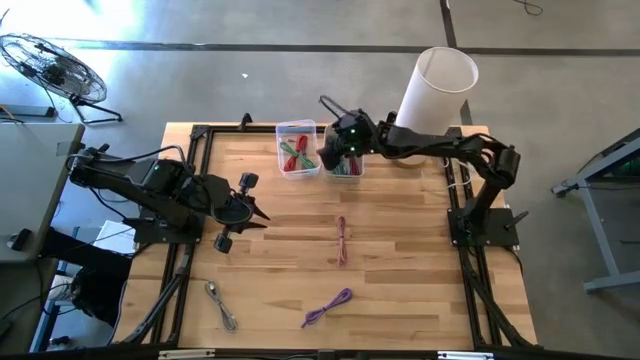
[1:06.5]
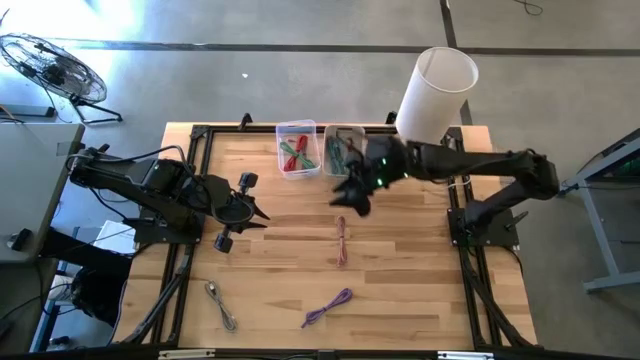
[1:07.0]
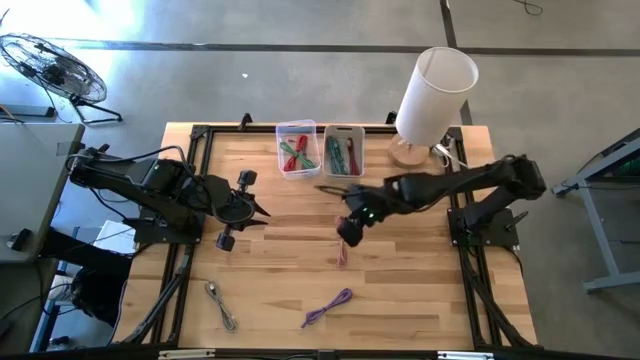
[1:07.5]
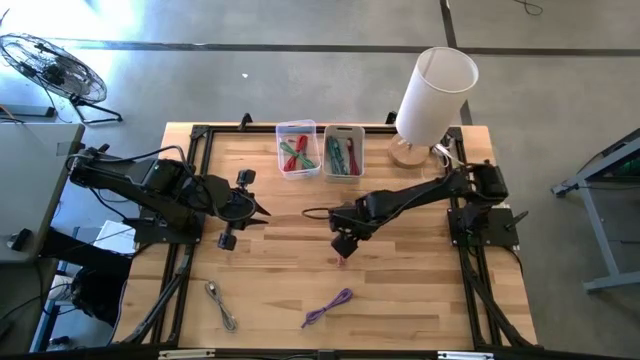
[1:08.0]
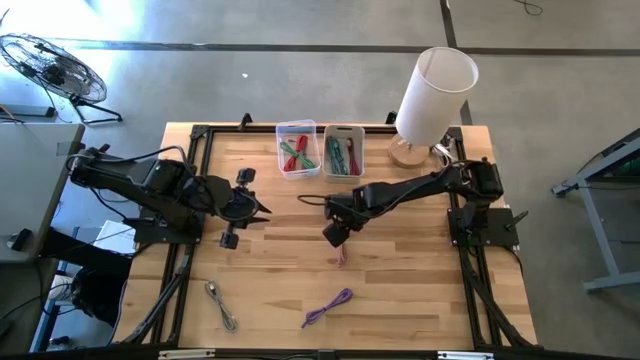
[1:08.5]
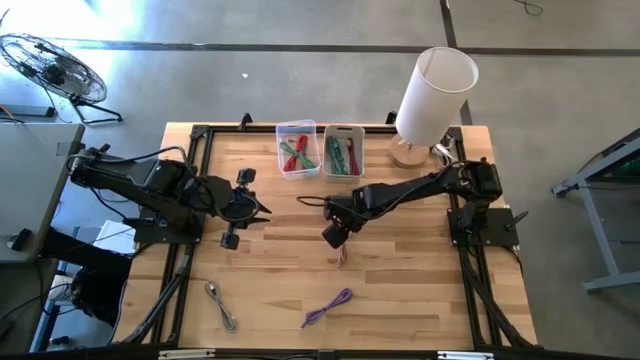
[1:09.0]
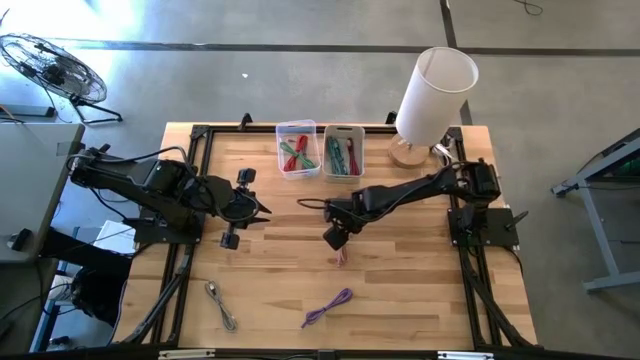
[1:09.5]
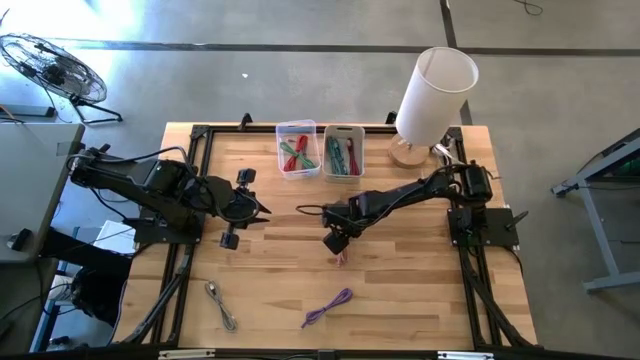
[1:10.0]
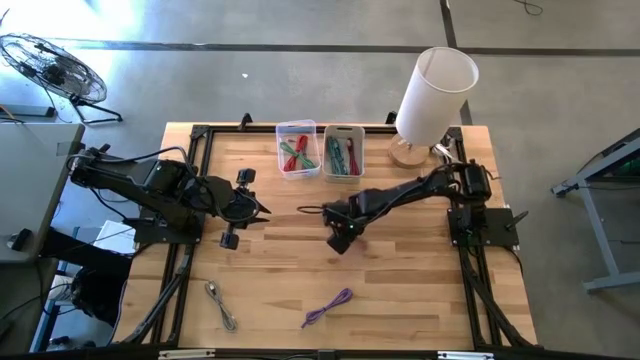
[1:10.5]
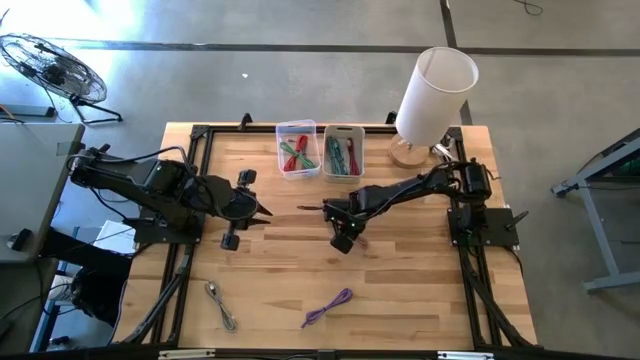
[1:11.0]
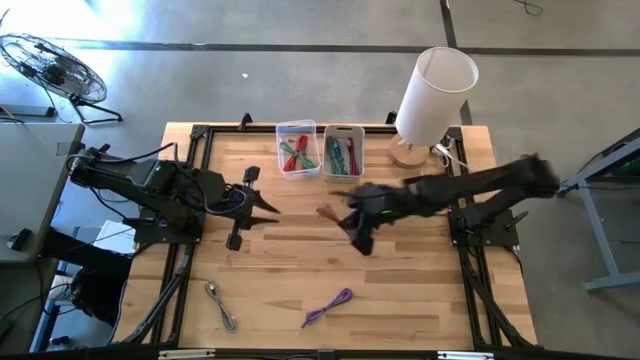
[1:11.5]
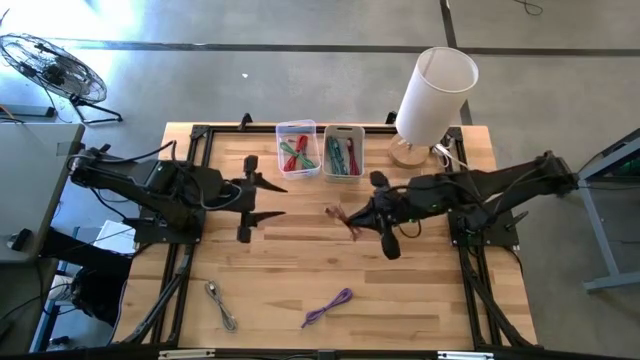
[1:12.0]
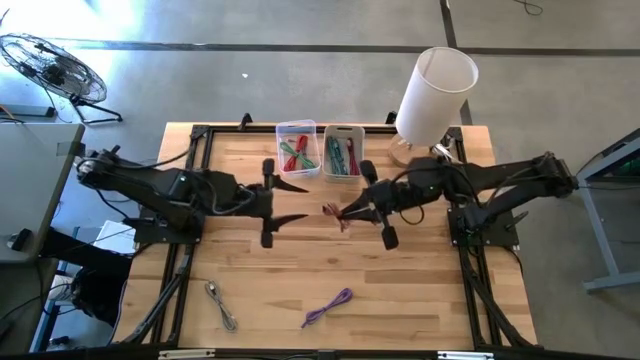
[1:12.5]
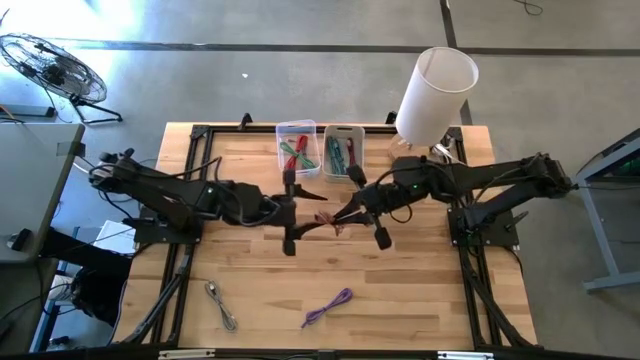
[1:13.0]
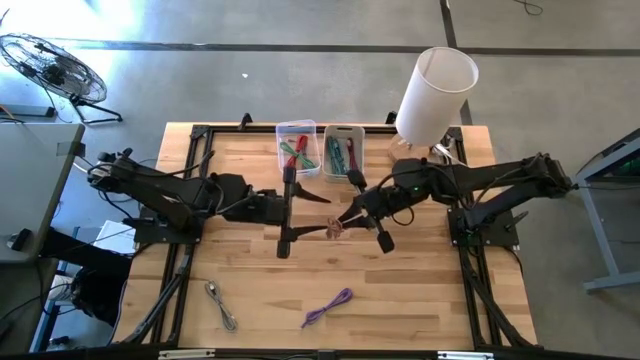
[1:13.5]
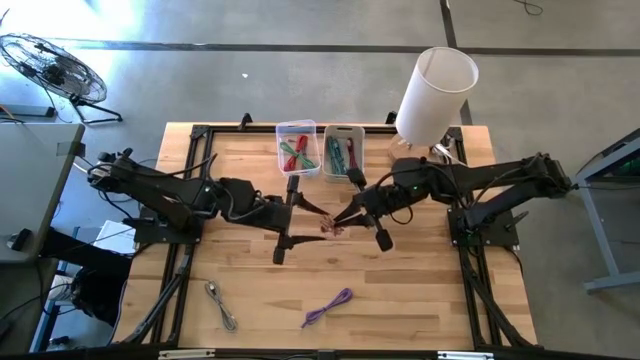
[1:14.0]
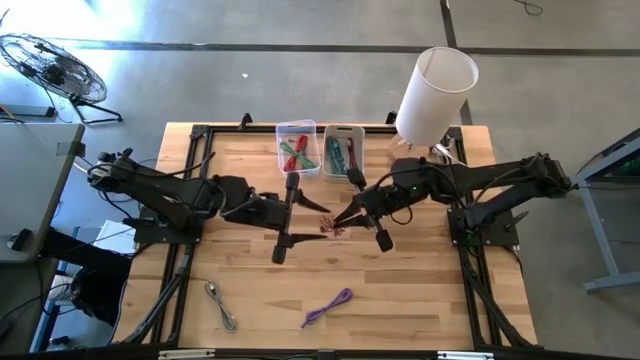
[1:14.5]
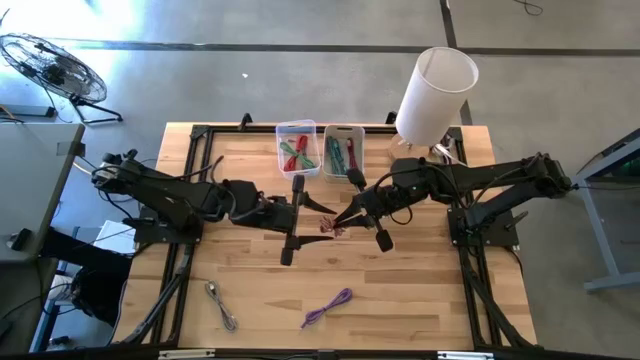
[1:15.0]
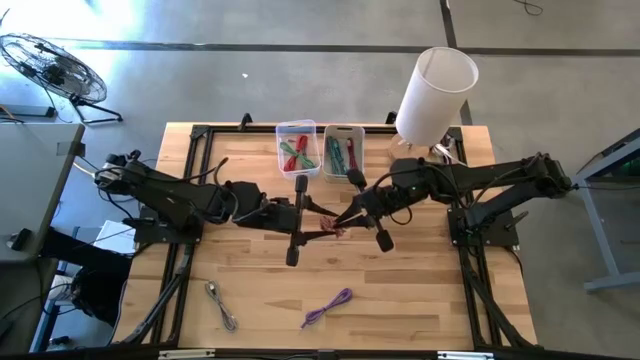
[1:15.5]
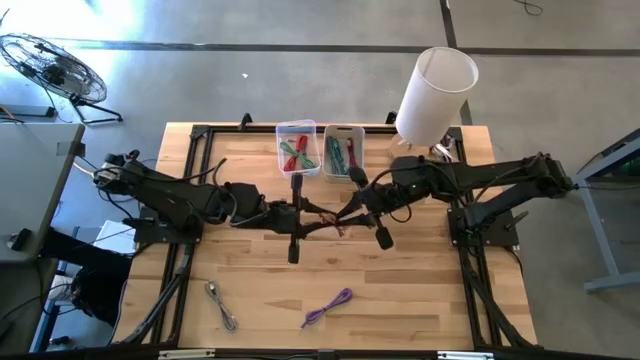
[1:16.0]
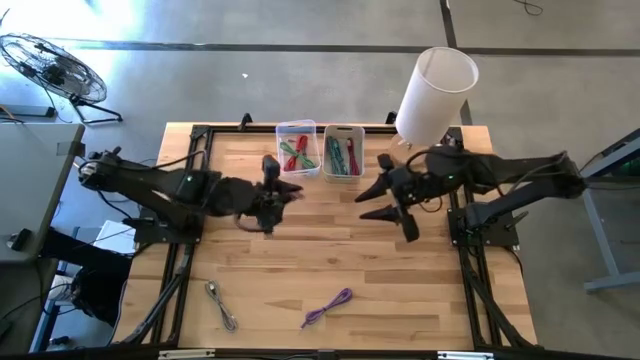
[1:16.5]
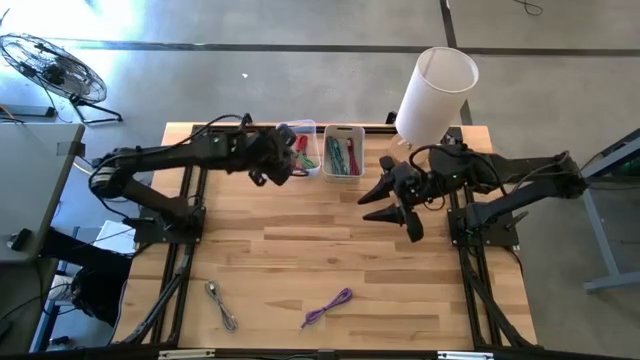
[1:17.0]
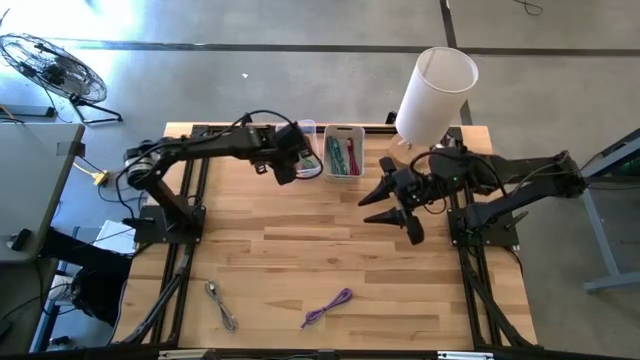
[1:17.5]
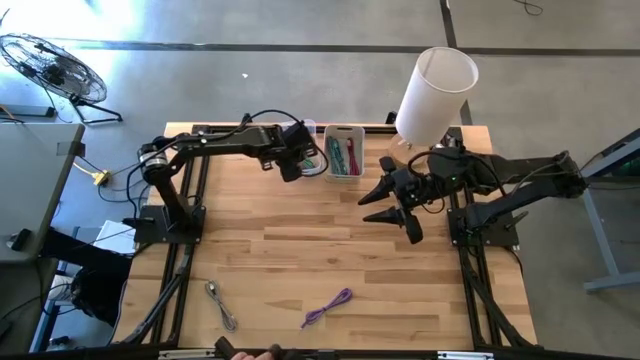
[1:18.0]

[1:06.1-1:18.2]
Task: Pick & Place USB Port
Put the pink cable into the transparent bin

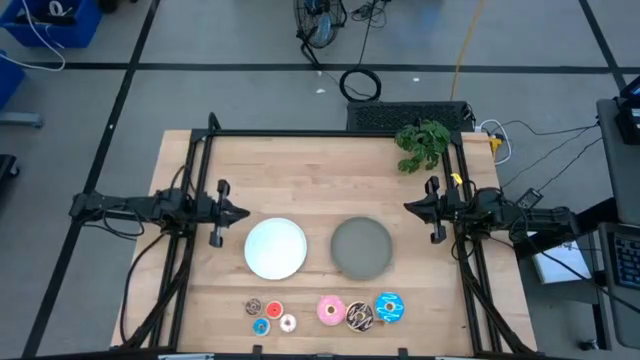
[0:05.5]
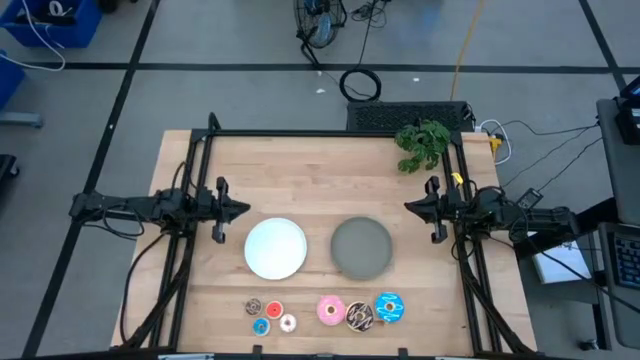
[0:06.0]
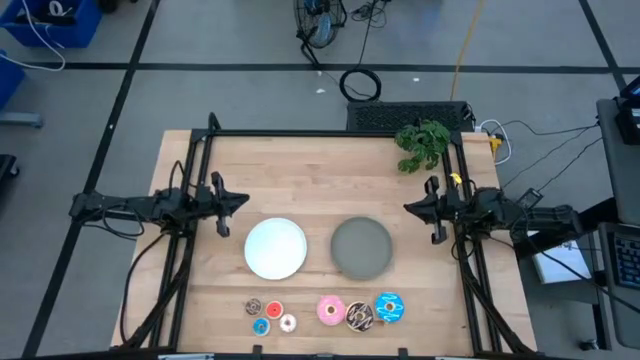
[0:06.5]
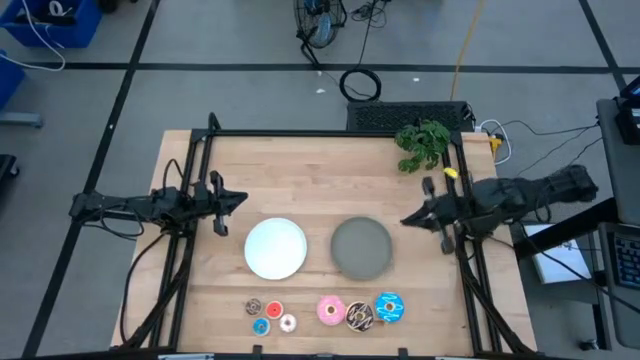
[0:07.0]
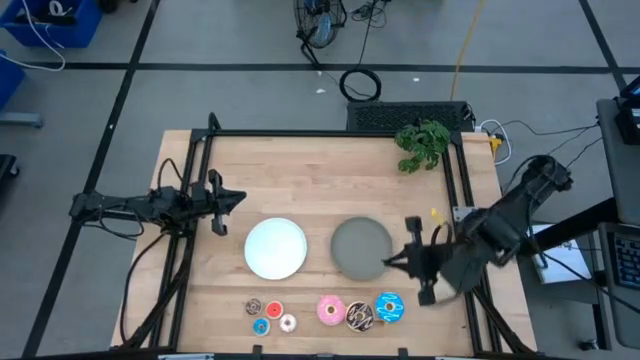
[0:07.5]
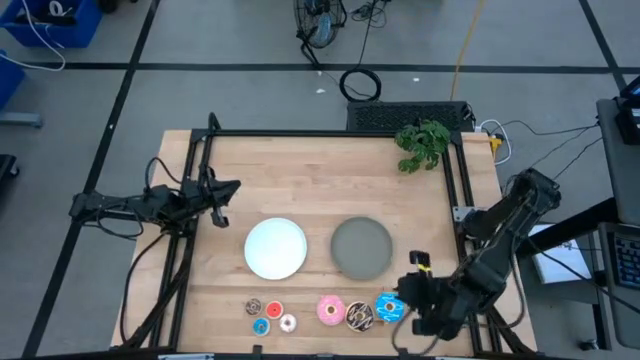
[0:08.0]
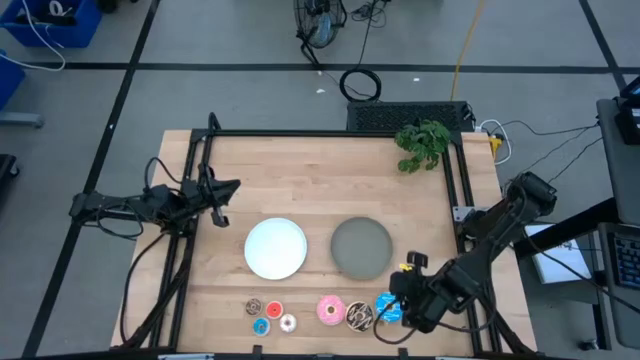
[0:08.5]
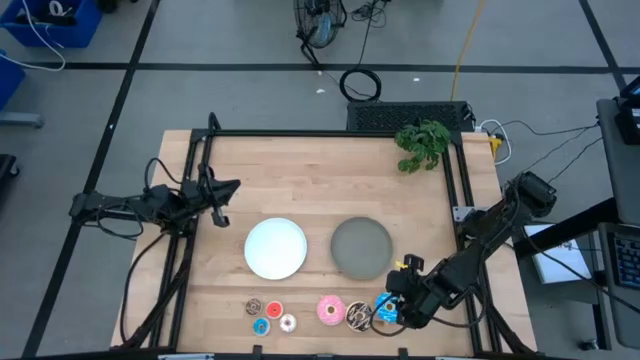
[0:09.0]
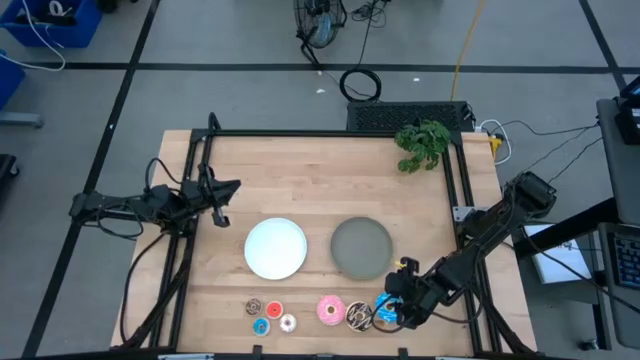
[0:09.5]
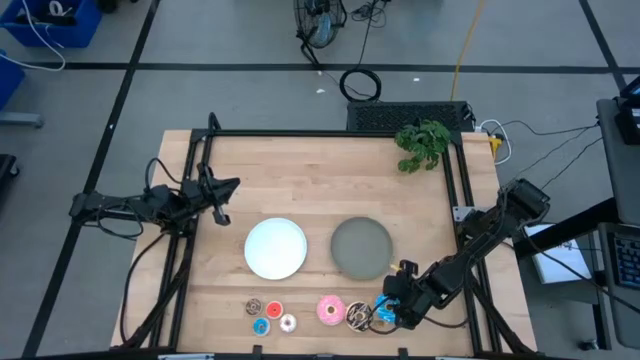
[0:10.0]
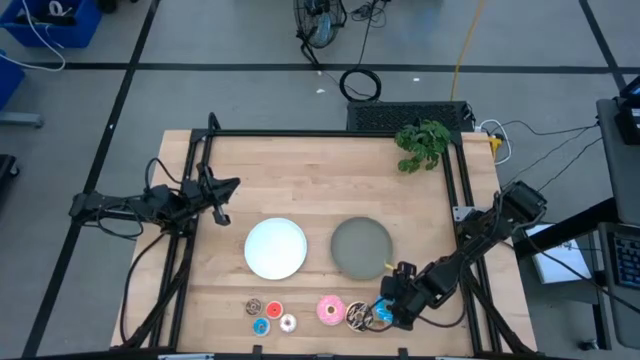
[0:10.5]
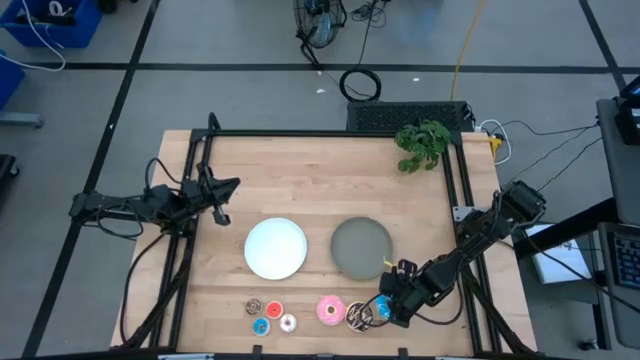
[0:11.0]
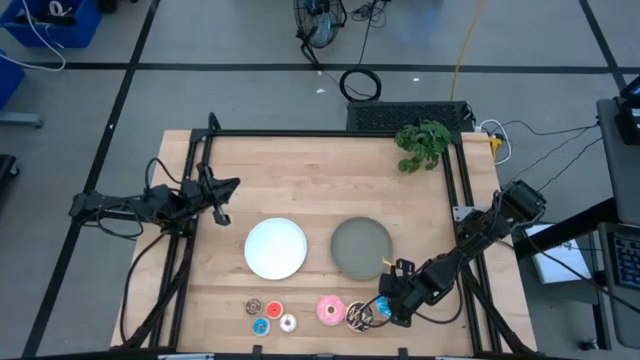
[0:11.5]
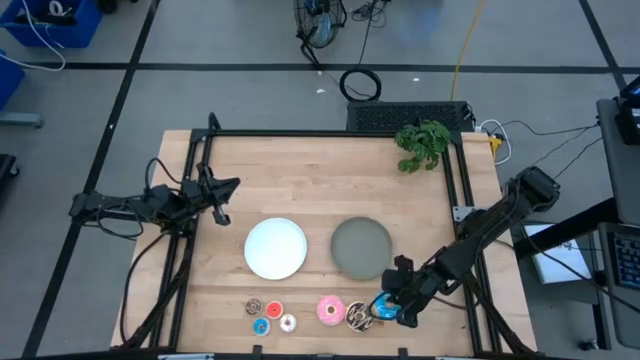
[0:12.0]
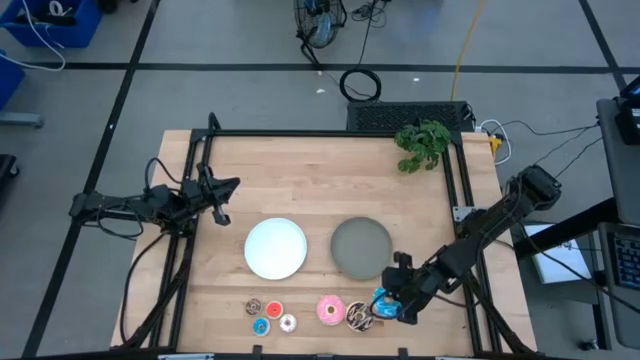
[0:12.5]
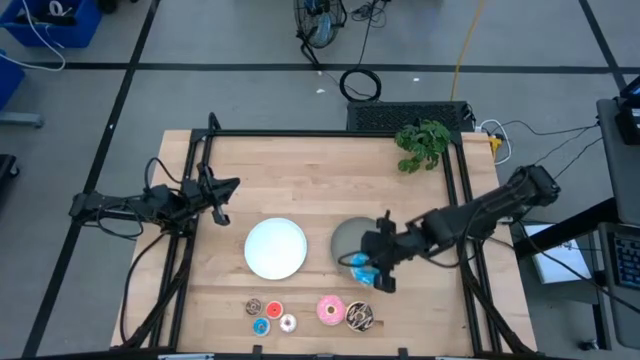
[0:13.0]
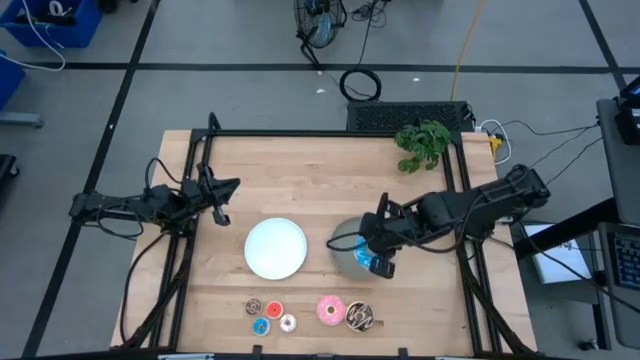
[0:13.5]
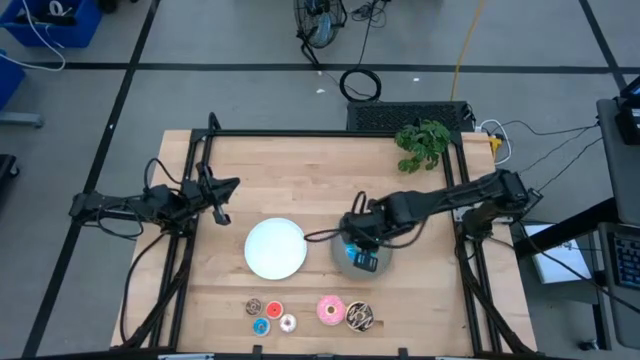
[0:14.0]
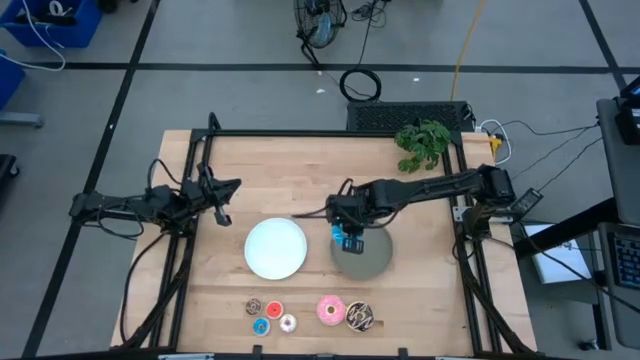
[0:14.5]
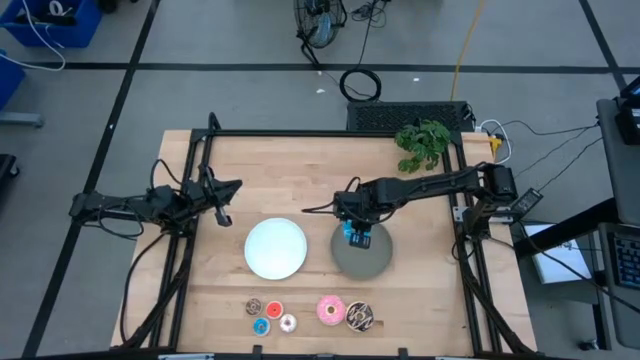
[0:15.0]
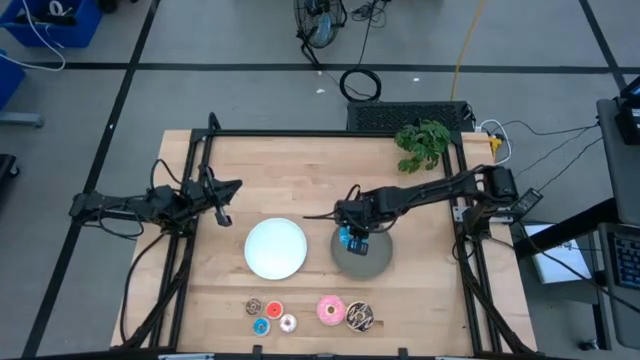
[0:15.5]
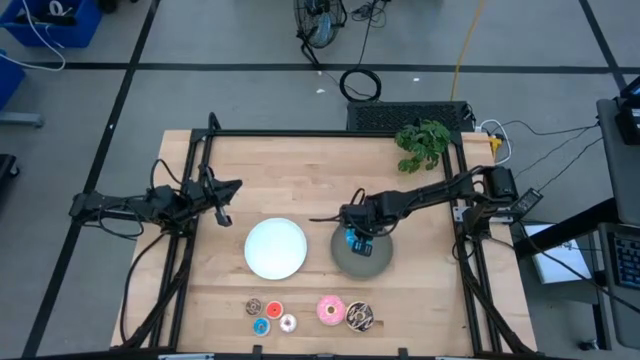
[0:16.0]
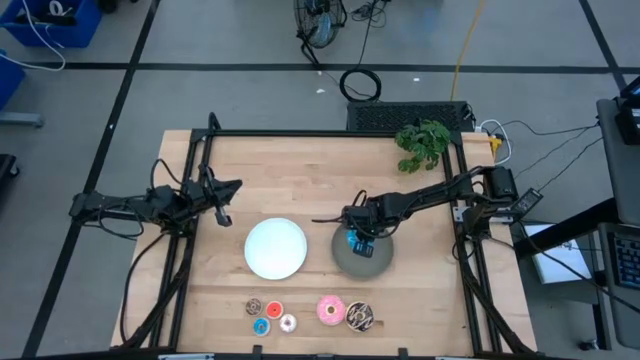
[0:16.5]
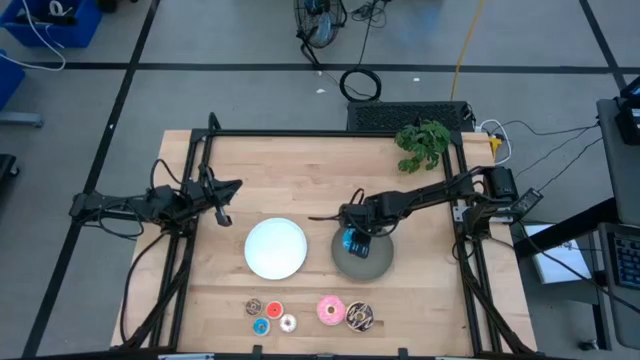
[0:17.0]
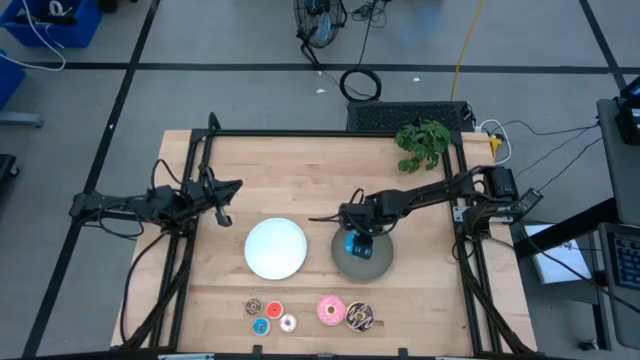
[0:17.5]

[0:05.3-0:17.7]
Task: Pick & Place donuts
Put the big blue donut into the gray plate
